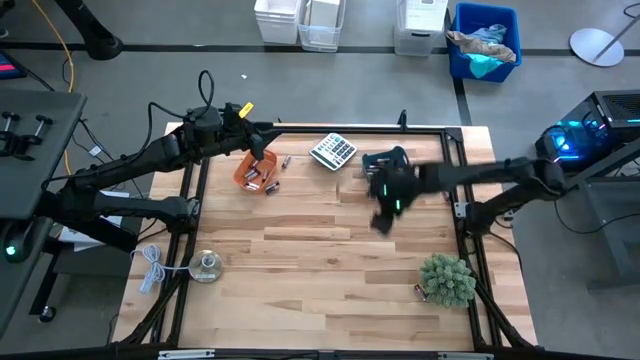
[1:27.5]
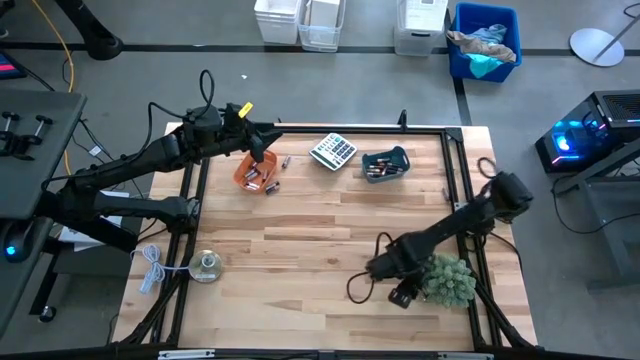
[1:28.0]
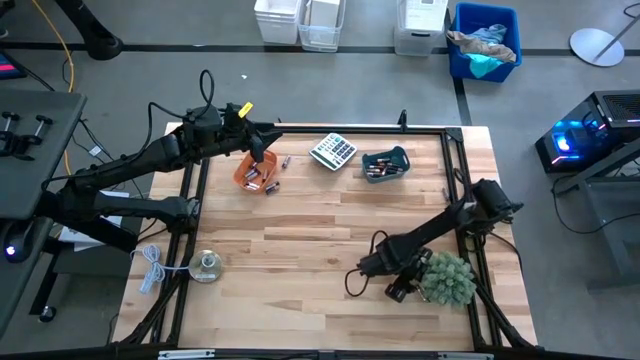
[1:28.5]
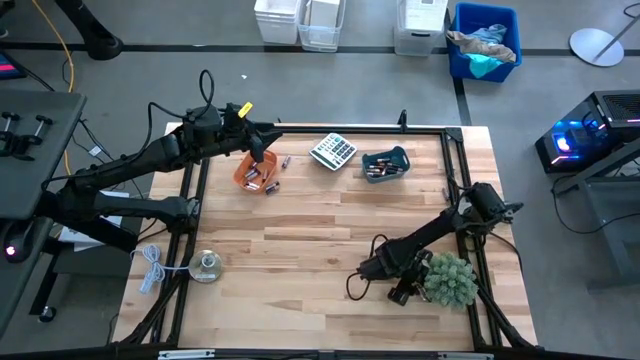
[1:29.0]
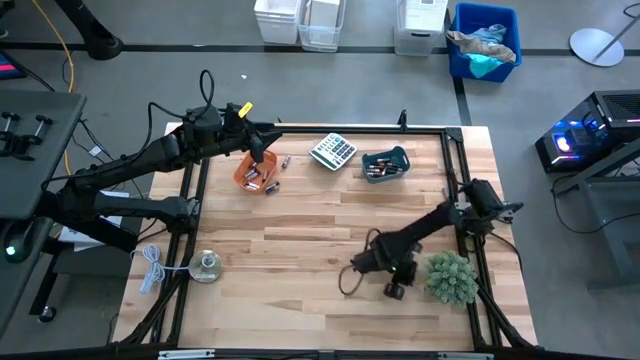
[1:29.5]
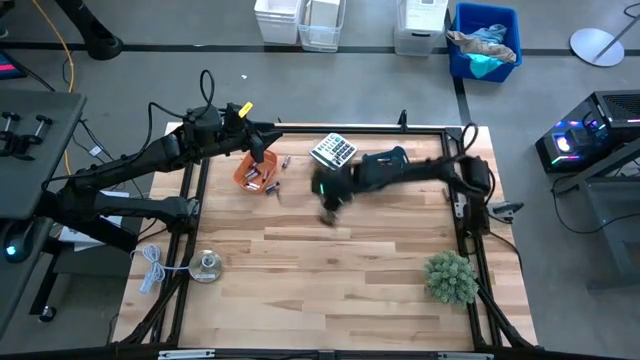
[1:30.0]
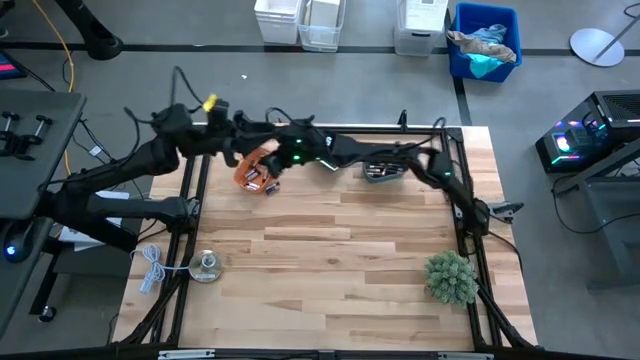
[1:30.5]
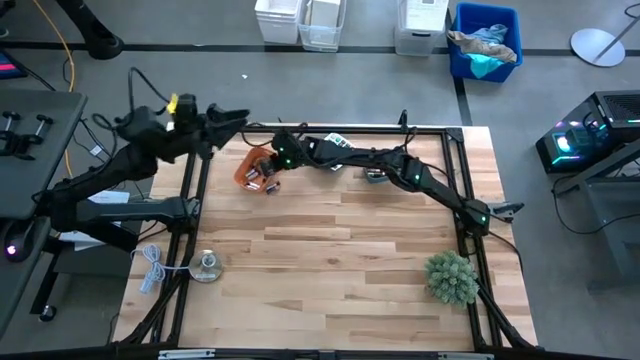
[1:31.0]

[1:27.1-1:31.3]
Task: Sort batteries
Put the silver battery into the orange bin

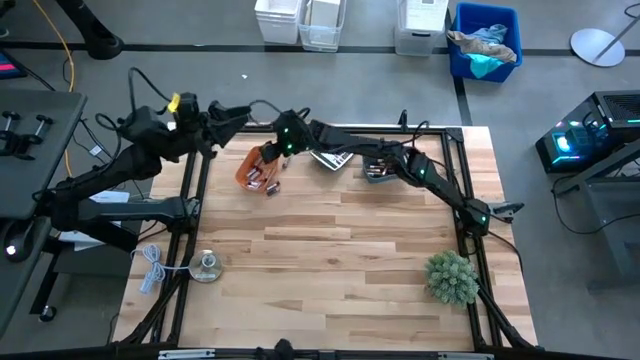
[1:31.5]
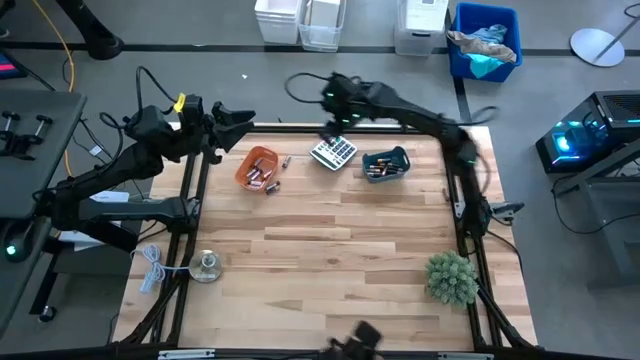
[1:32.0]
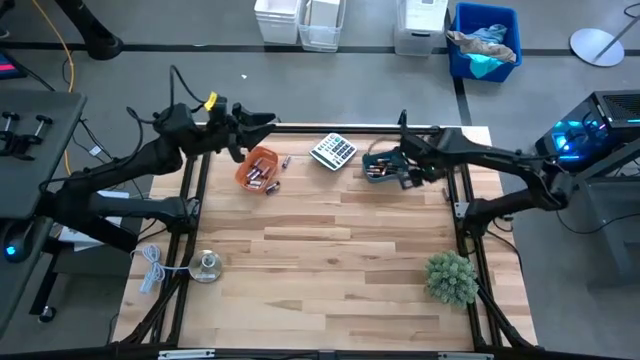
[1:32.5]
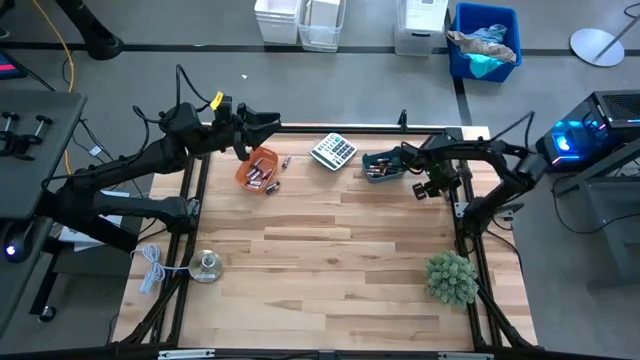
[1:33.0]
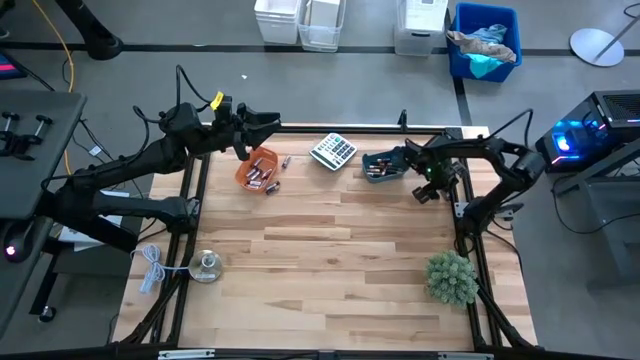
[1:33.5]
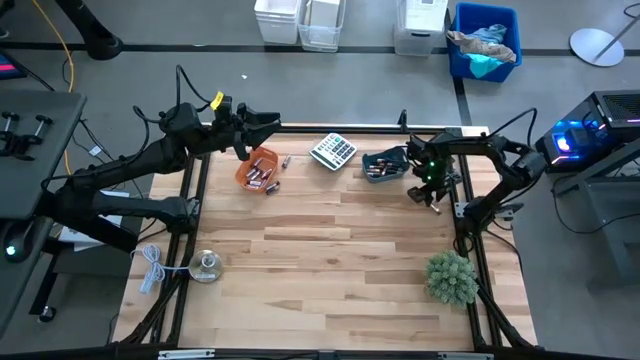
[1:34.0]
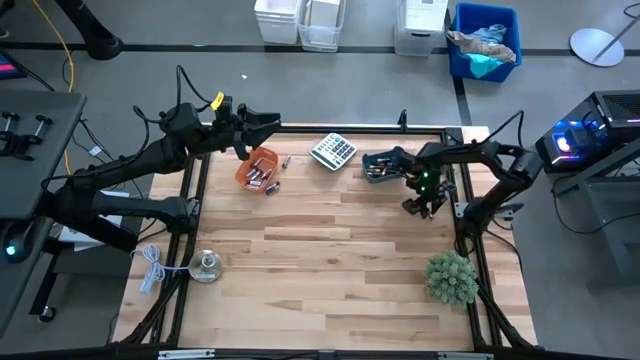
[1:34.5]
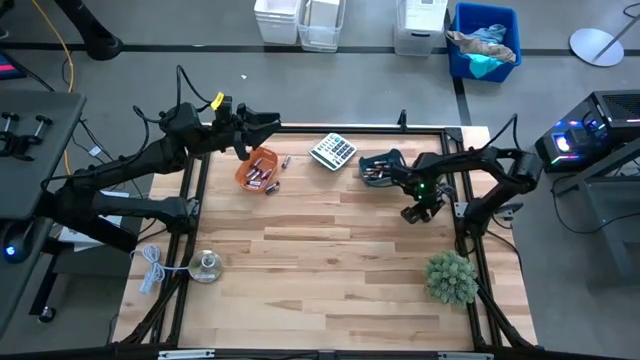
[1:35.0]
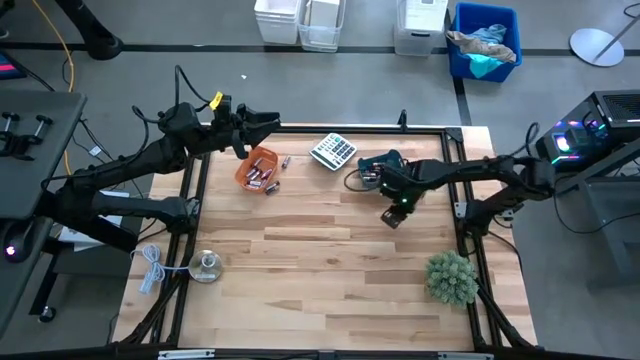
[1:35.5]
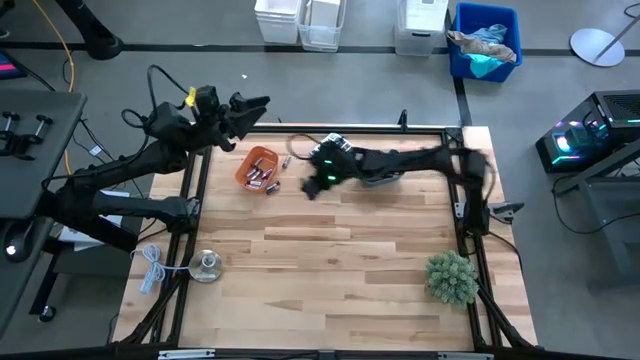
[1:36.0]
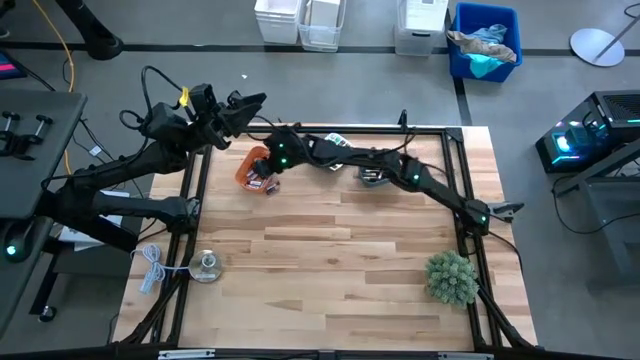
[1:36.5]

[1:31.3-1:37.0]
Put the right silver battery into the orange bin

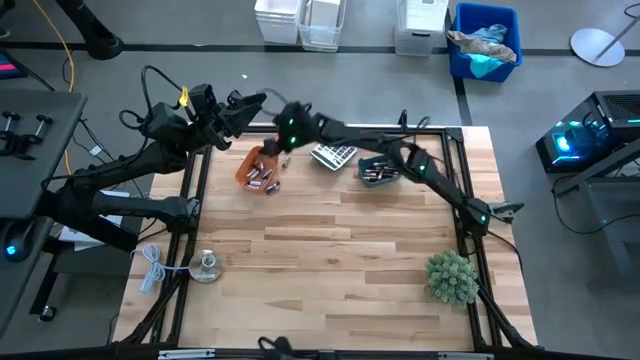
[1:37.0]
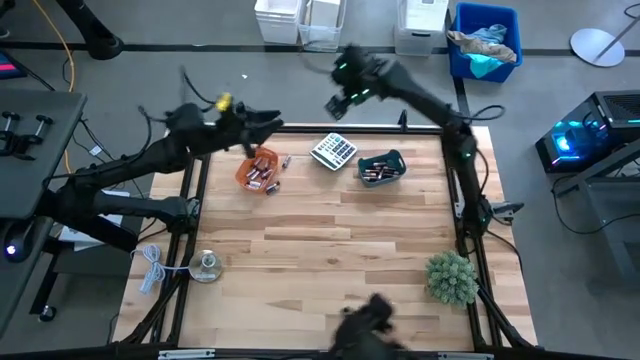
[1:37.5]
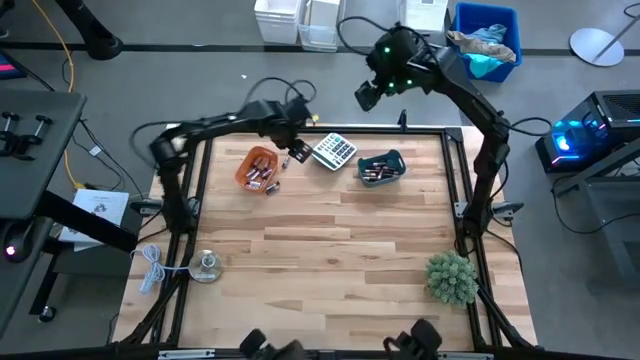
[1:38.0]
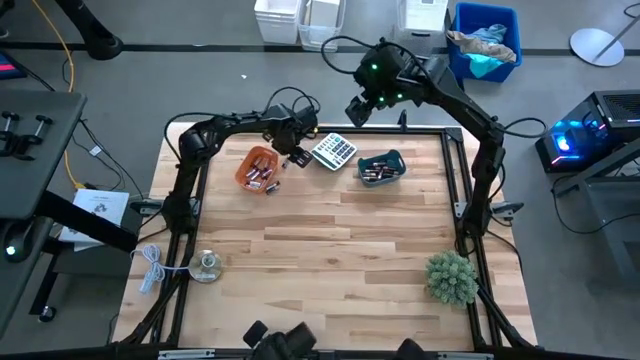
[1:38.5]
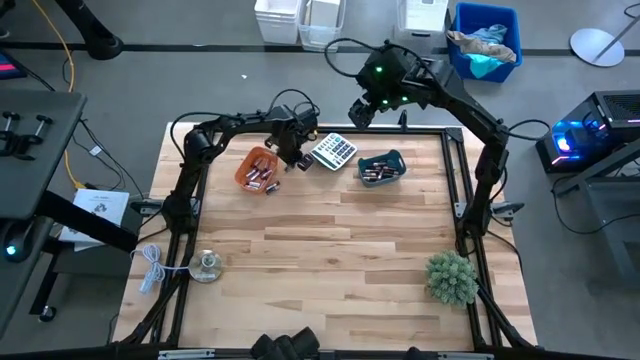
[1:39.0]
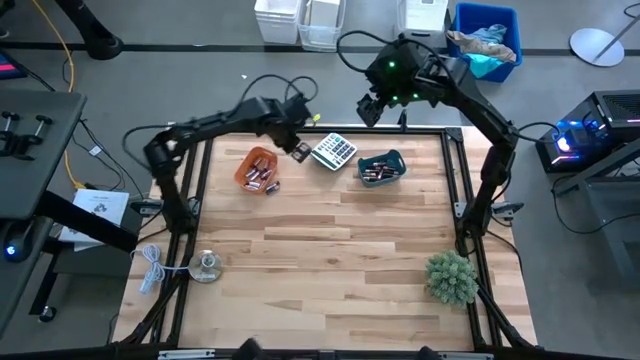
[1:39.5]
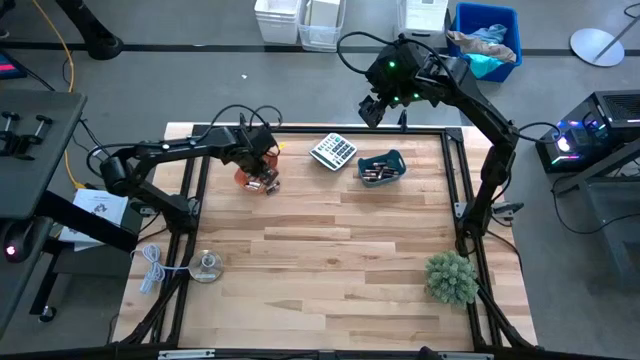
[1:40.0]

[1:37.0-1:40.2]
Put the top silver battery into the orange bin

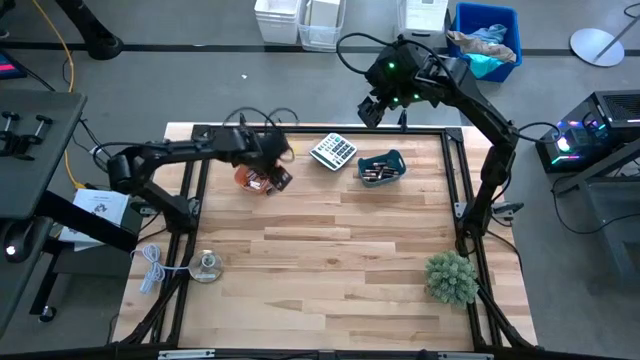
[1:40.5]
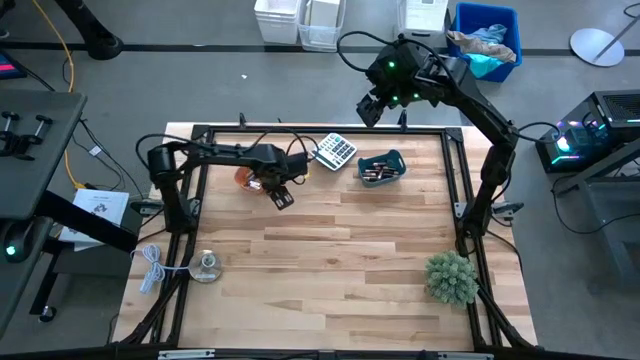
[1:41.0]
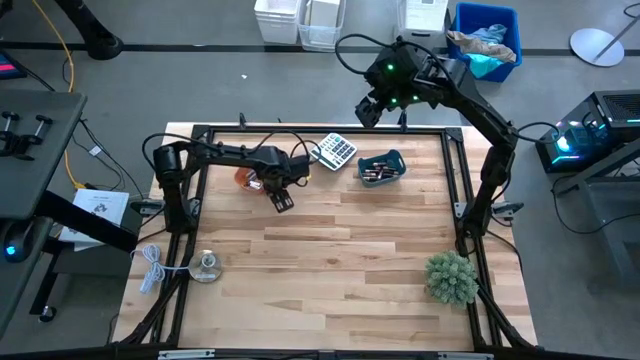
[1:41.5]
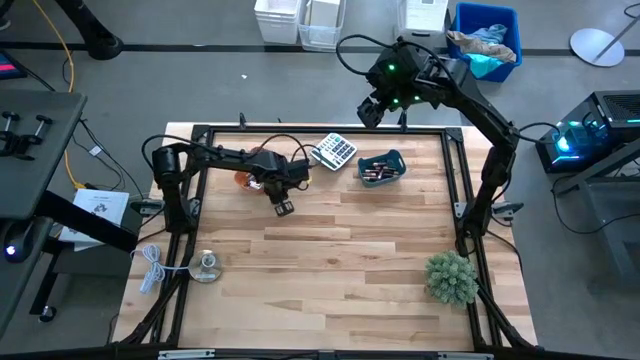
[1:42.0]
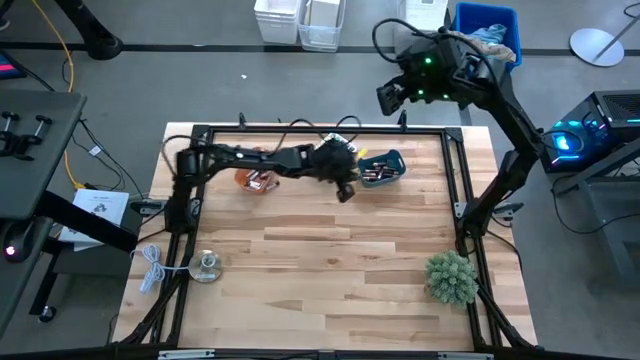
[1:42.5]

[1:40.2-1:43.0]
Put the top golden battery into the blue bin

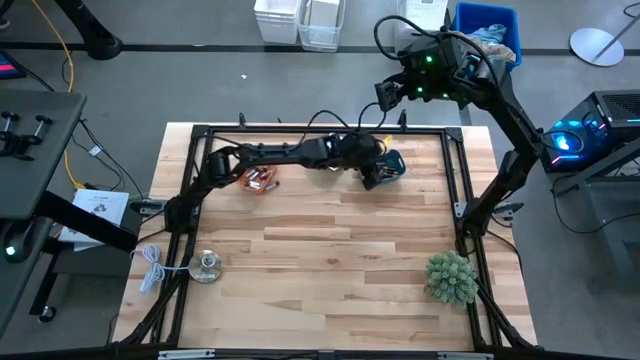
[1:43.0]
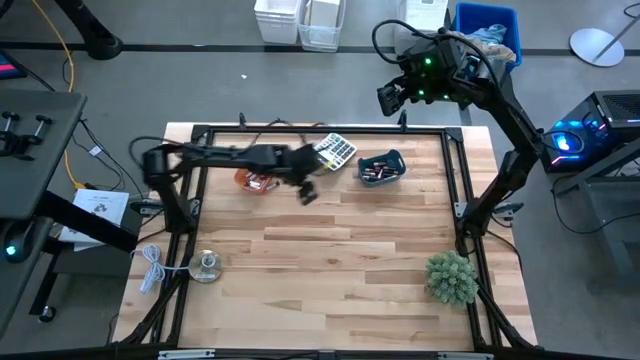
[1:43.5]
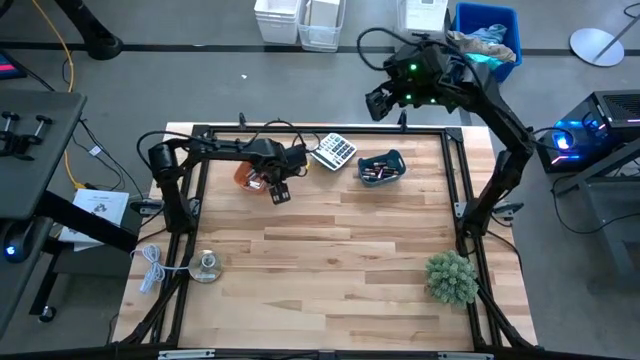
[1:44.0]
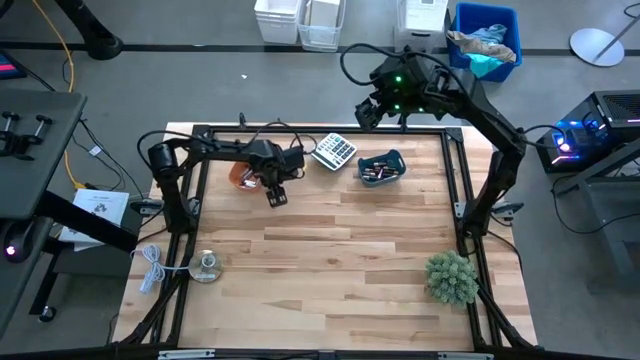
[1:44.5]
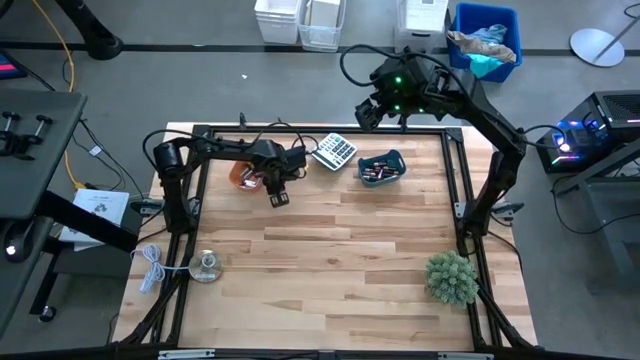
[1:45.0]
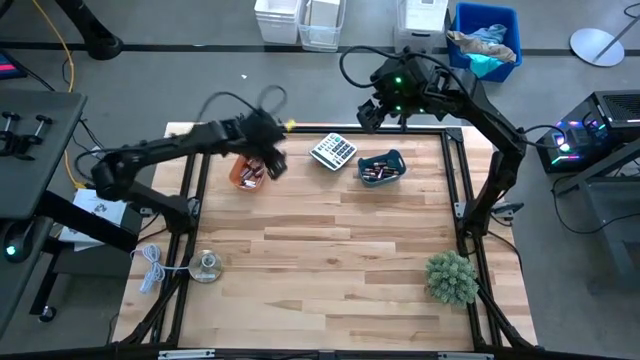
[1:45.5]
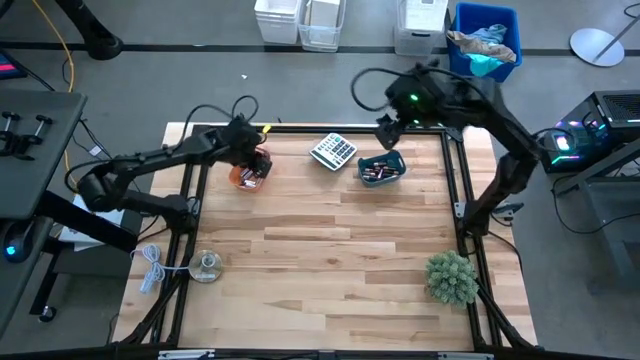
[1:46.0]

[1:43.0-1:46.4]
Put the silver battery into the orange bin

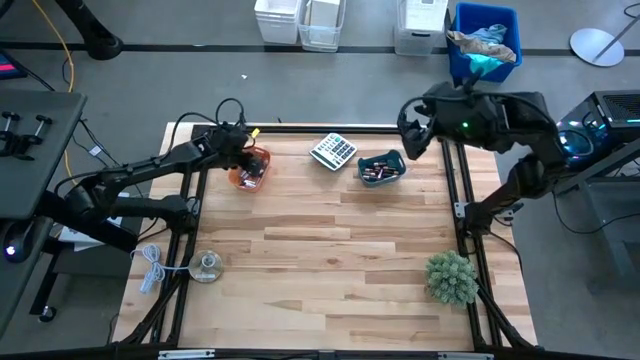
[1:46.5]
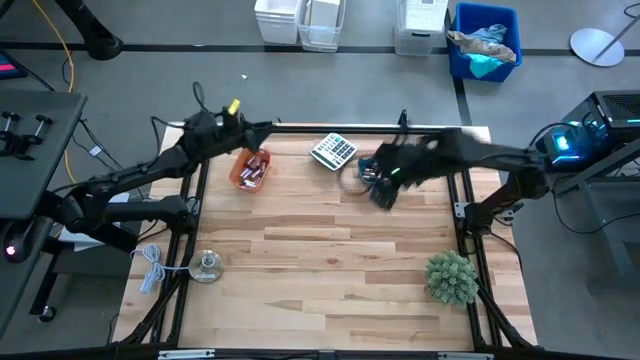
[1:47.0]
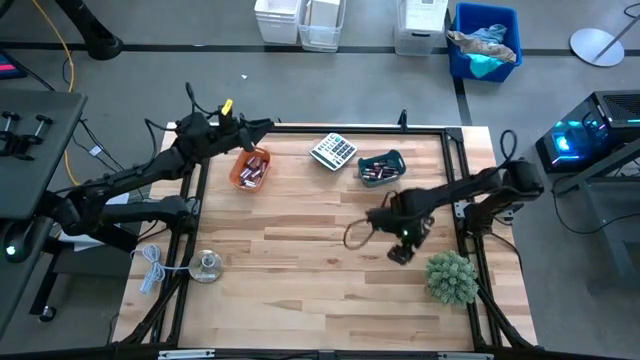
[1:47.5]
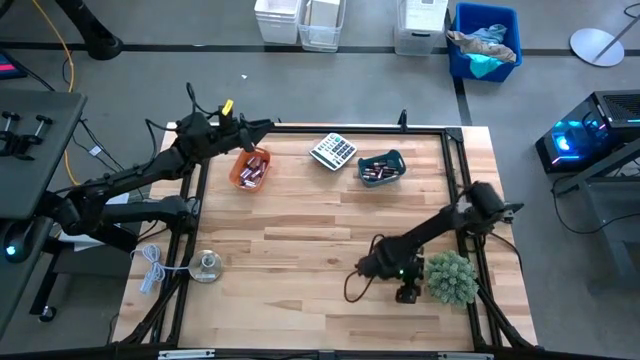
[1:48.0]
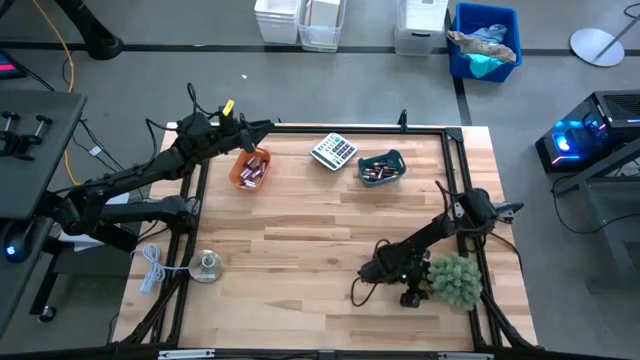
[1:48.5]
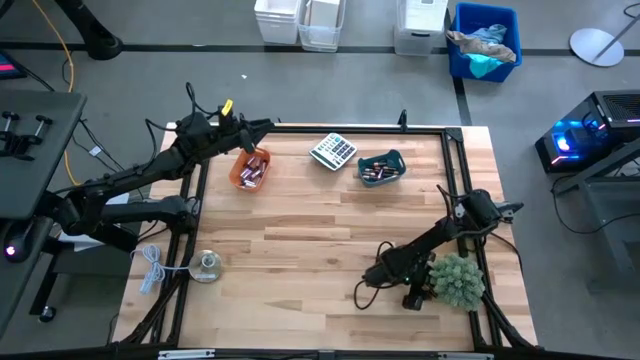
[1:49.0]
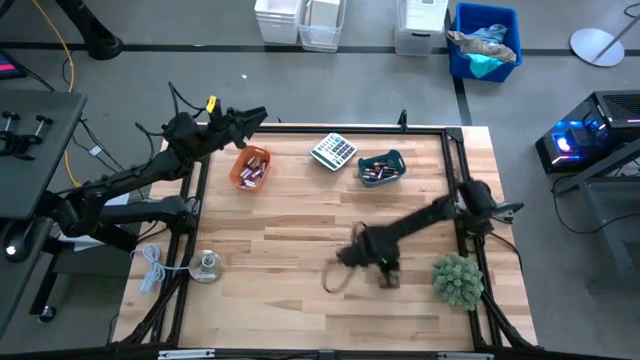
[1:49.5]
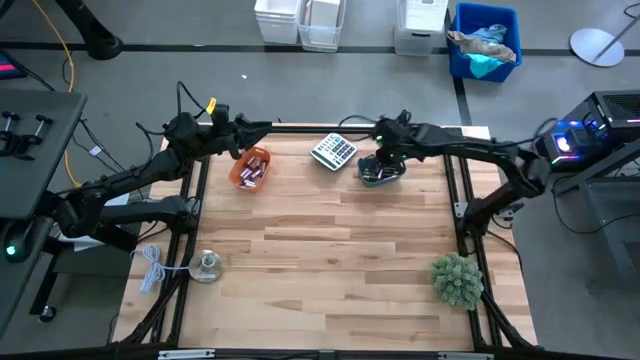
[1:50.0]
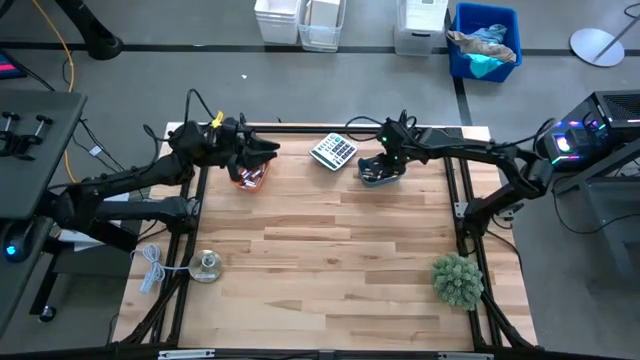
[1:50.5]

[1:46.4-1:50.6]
Put the golden battery into the blue bin
